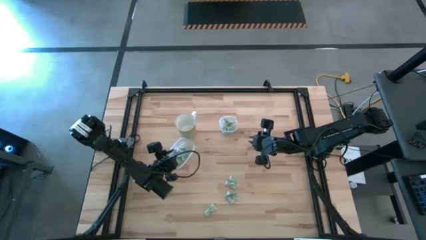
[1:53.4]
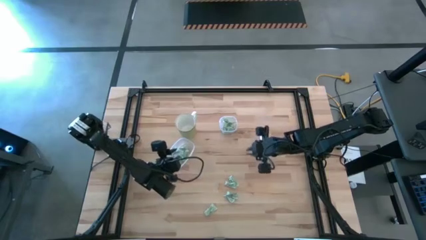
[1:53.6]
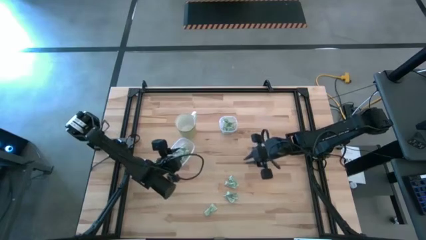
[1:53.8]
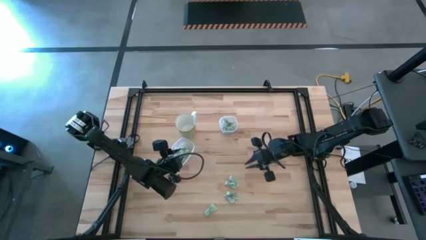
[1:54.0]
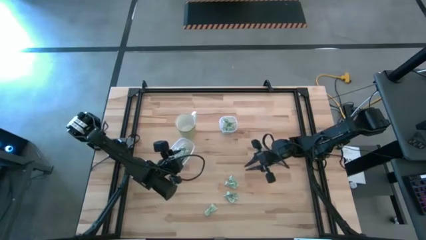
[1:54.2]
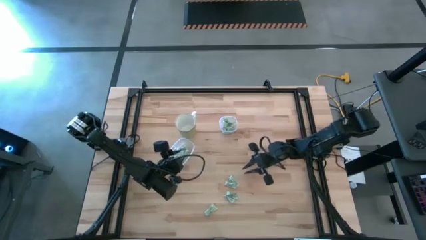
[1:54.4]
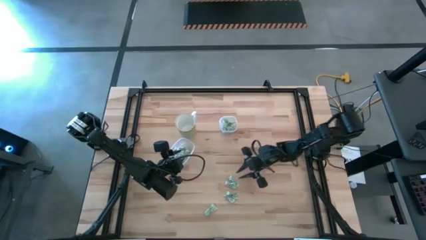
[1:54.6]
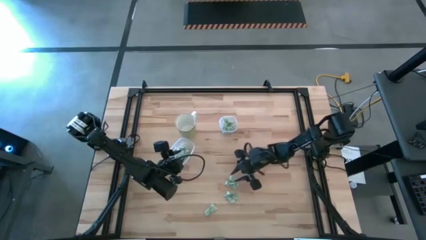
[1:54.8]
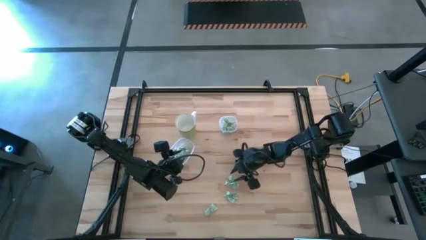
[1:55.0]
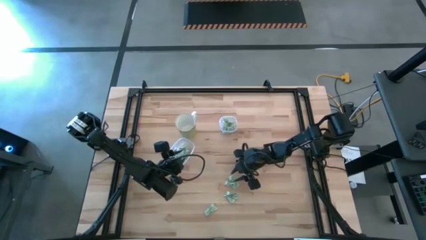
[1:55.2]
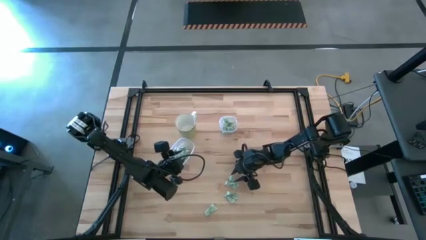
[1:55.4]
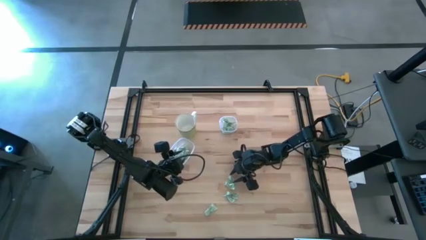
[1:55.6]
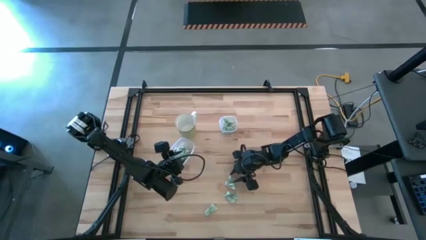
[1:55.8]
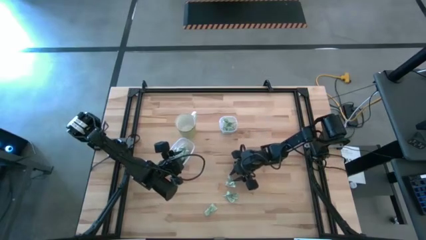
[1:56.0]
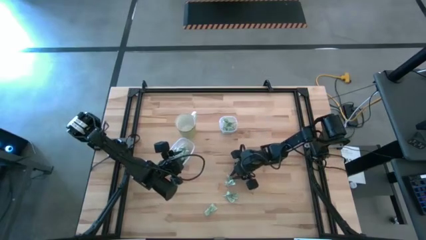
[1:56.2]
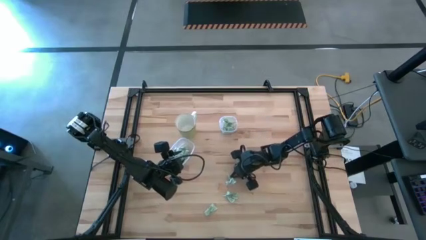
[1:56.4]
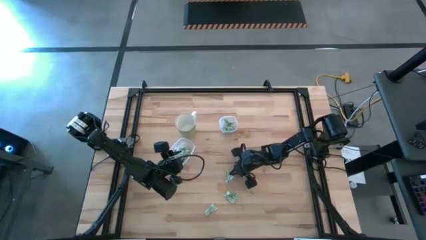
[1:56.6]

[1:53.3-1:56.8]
Task: Pick and place items into bin
Put the stevia packet into the top transparent bin

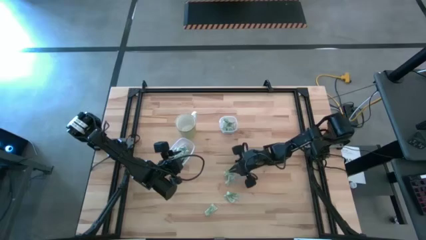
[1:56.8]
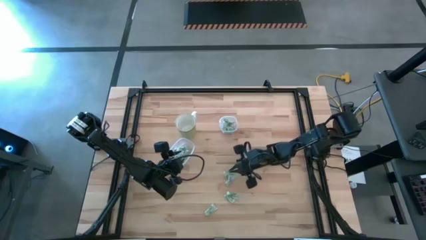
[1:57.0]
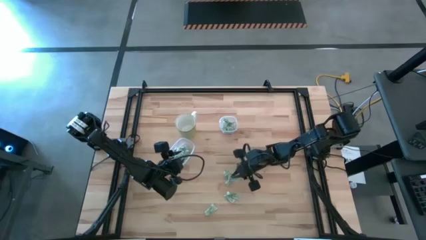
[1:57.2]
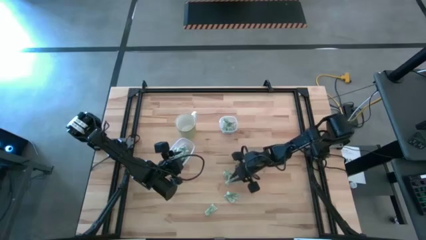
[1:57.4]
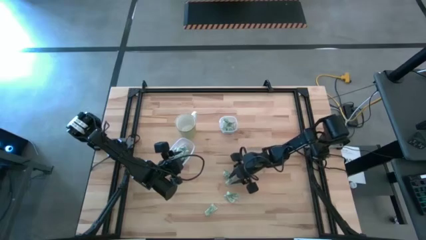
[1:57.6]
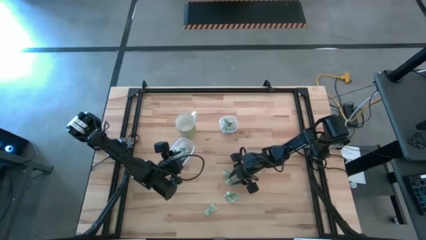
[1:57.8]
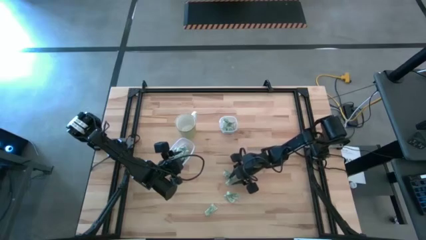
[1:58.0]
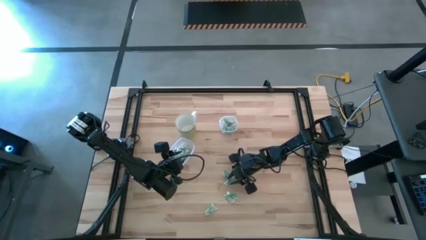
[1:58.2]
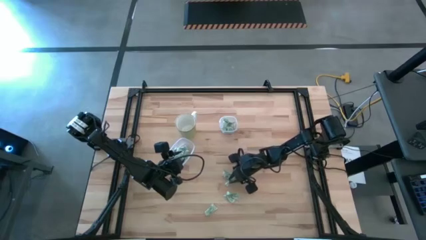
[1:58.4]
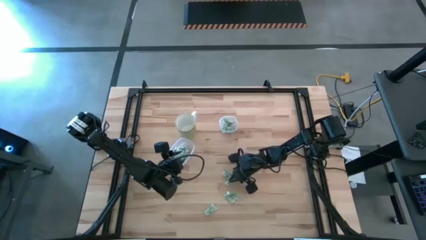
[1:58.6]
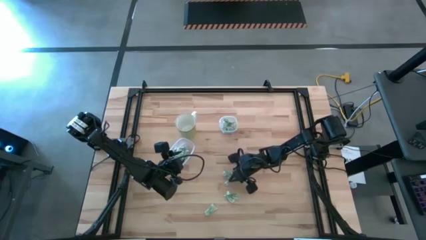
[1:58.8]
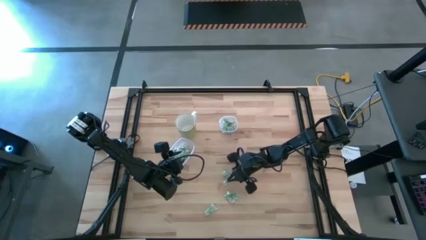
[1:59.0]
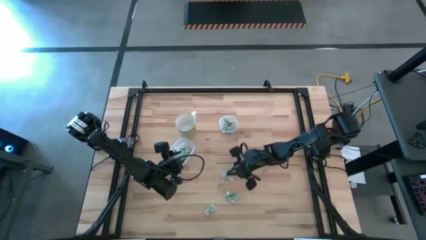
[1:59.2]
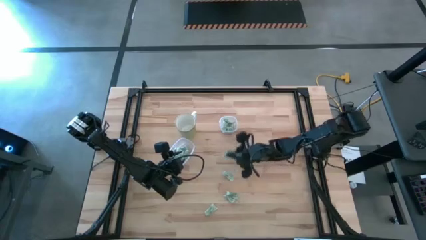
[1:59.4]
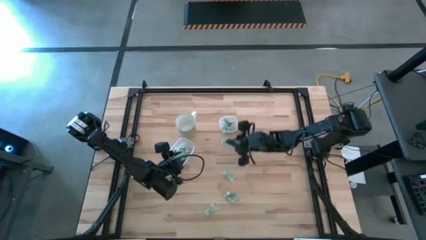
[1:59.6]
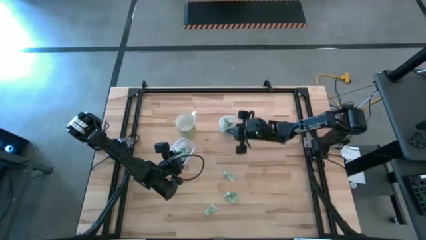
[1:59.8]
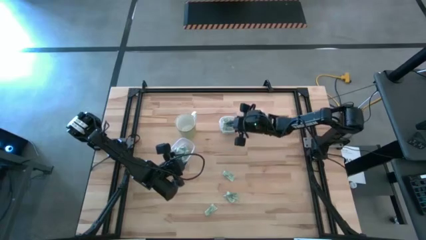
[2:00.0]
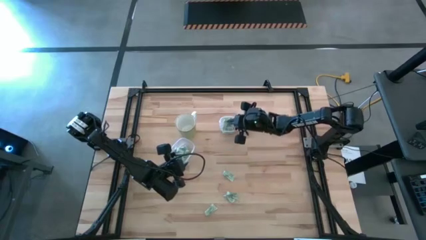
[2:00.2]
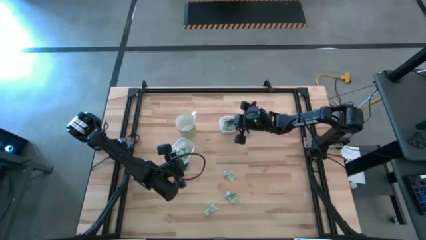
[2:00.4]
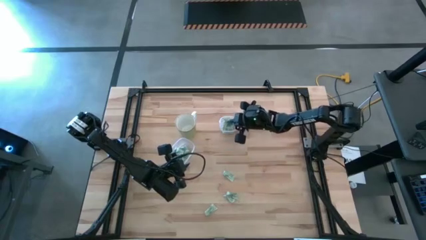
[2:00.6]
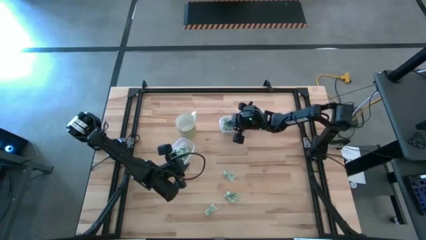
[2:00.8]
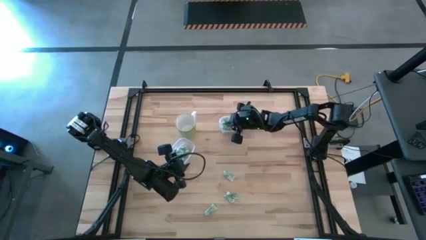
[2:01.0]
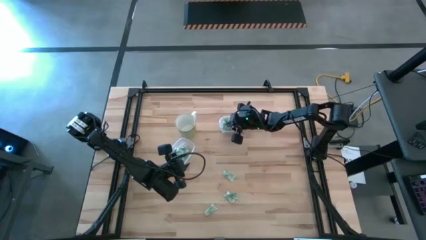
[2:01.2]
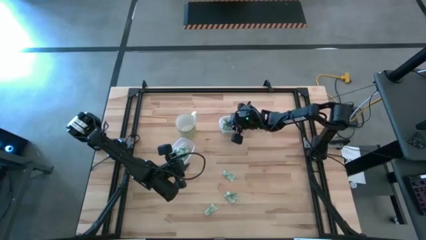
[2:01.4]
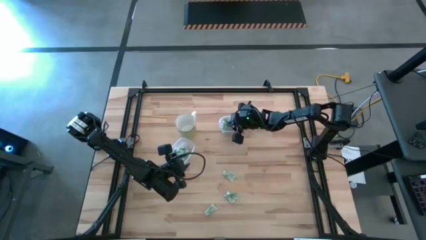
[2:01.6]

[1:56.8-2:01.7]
Put the stevia packet into the top transparent bin

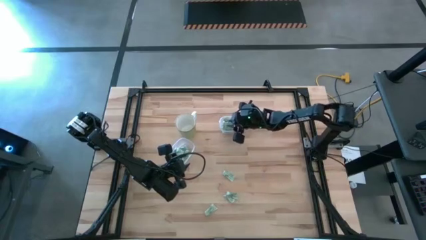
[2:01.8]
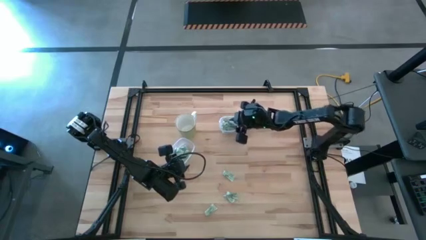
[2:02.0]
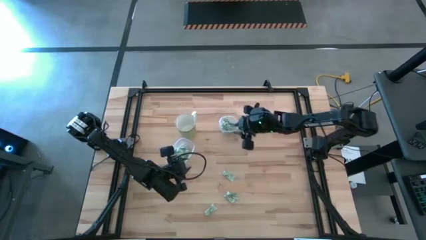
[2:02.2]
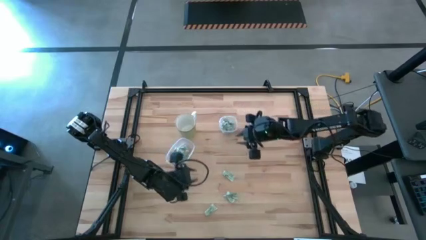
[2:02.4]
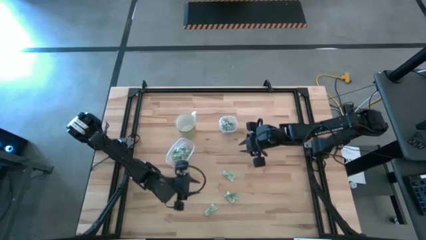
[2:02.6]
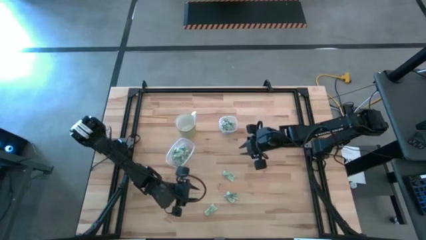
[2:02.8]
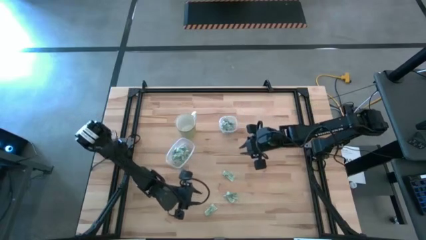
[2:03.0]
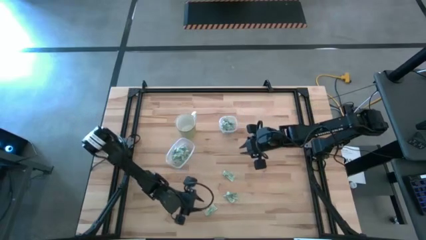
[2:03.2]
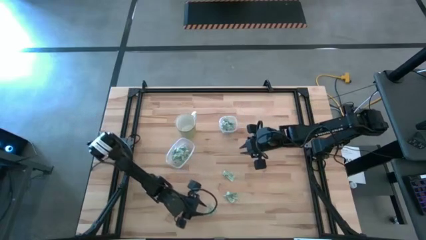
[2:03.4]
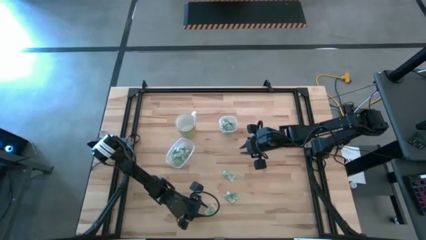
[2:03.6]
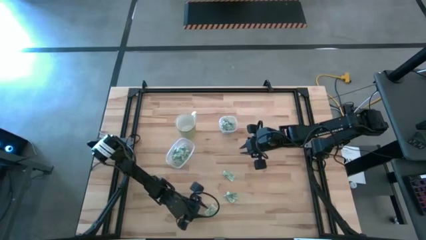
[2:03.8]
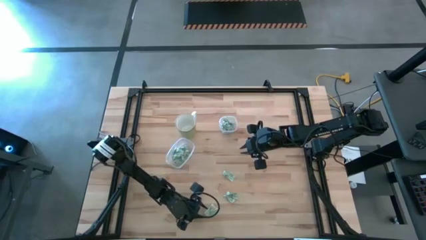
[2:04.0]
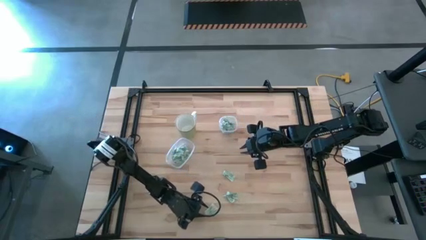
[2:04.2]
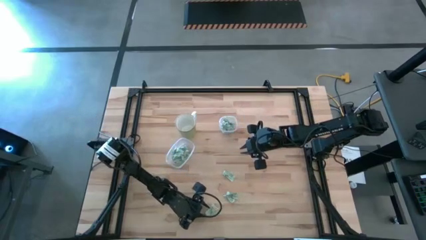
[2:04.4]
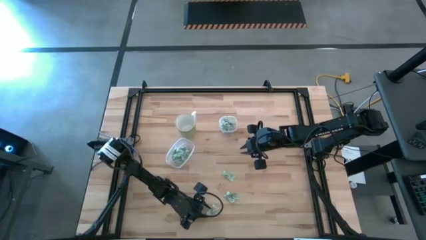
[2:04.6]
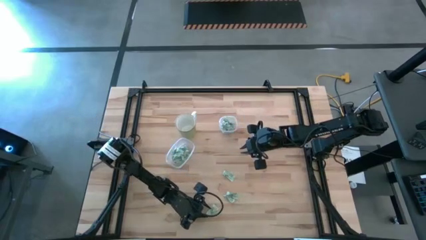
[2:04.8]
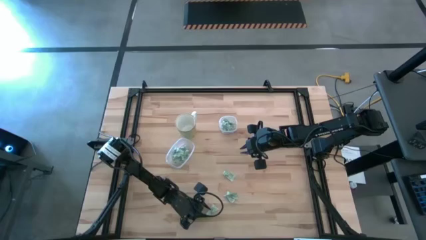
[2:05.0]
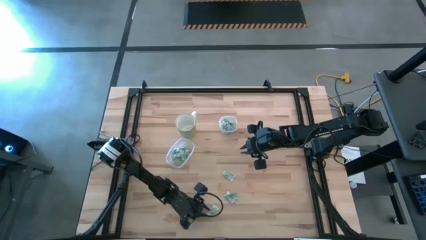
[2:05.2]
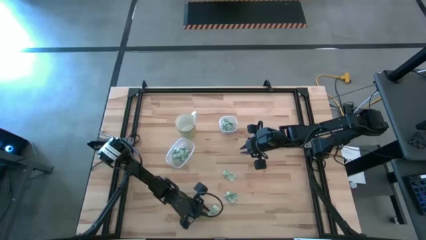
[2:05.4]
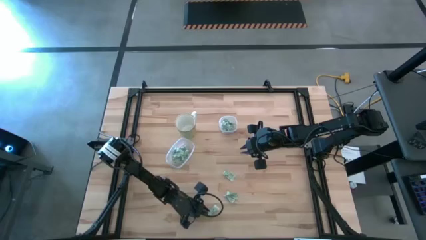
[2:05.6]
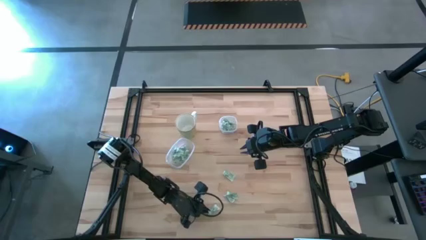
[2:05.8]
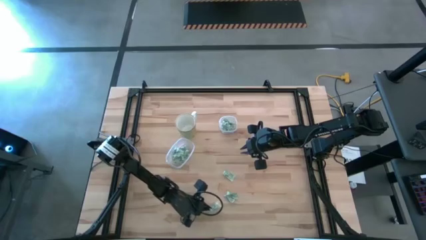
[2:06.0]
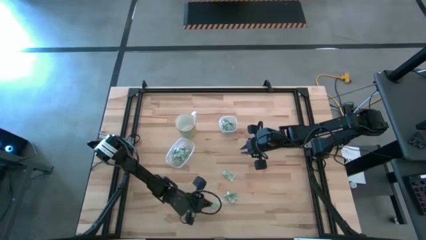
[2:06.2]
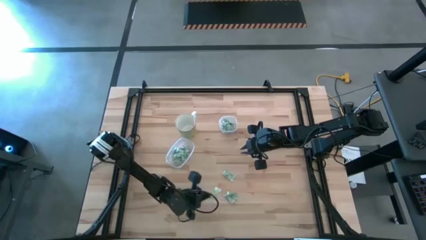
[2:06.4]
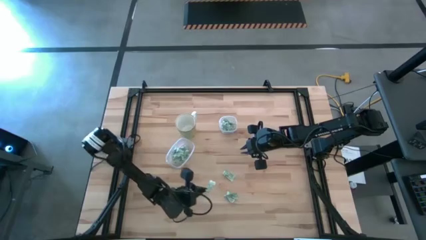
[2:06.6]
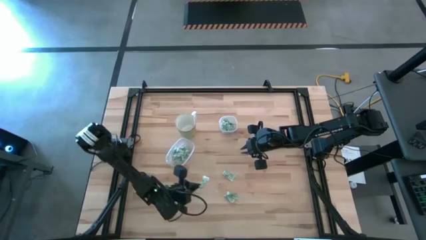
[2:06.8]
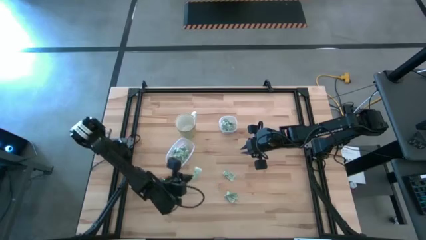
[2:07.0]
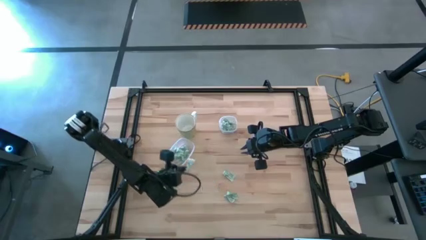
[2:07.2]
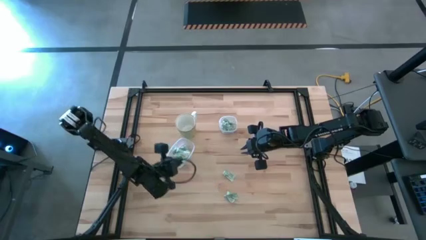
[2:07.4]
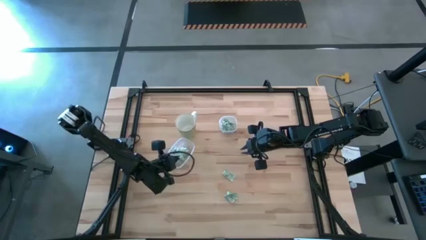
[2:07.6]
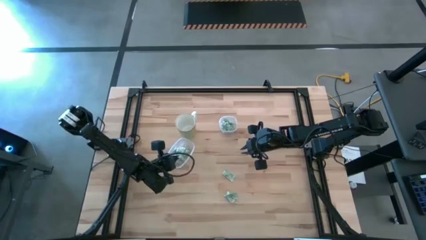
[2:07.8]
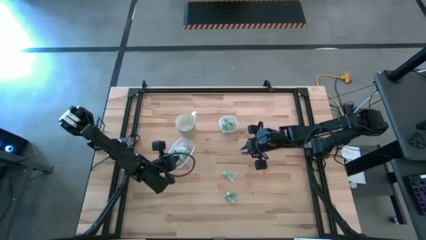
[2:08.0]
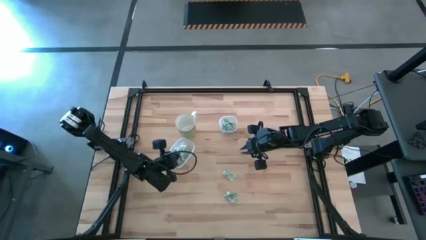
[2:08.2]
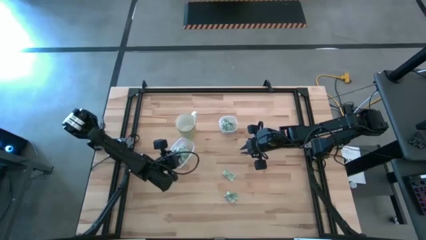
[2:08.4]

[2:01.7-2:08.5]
Put the stevia packet into the bottom transparent bin

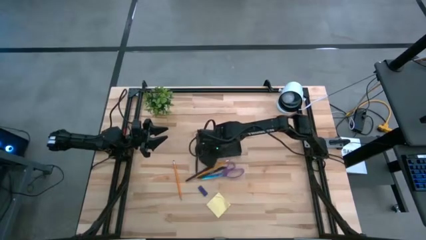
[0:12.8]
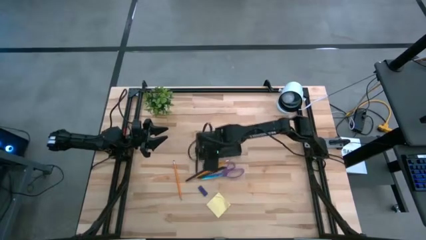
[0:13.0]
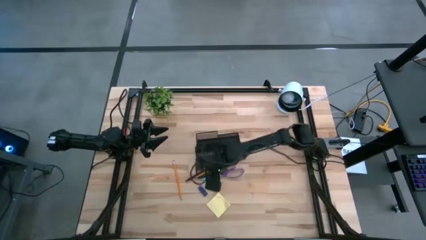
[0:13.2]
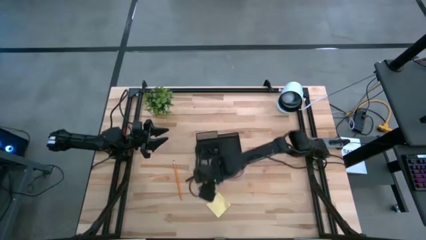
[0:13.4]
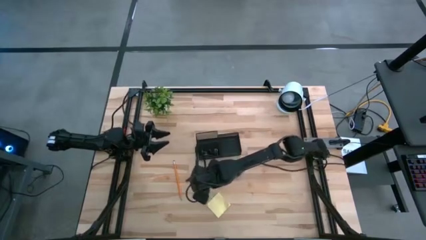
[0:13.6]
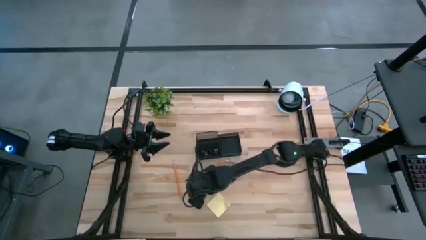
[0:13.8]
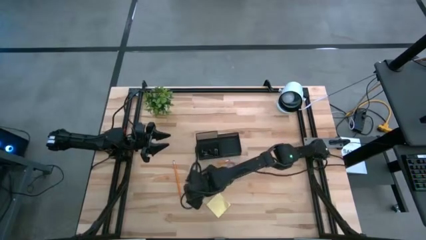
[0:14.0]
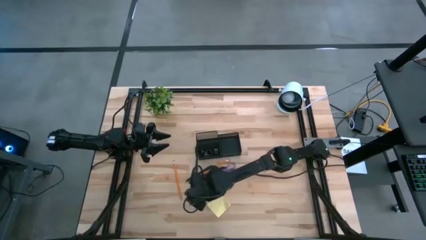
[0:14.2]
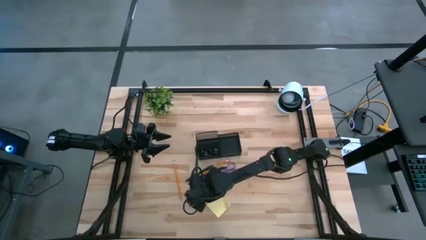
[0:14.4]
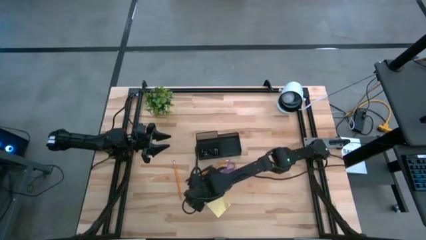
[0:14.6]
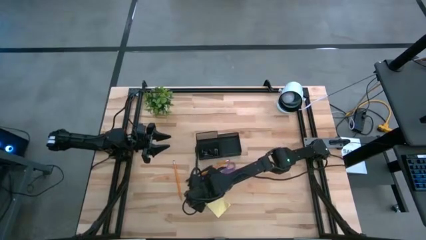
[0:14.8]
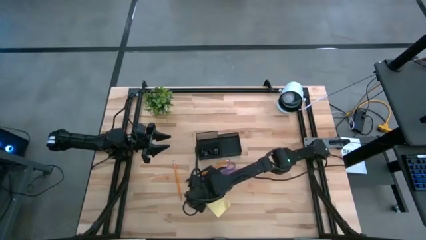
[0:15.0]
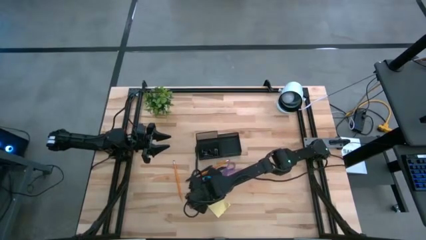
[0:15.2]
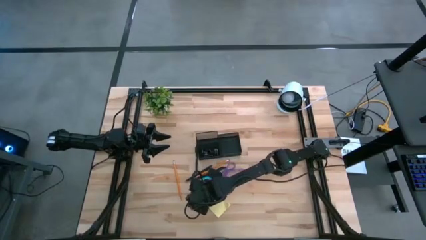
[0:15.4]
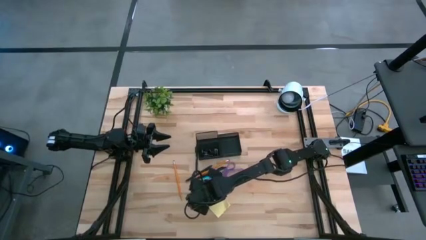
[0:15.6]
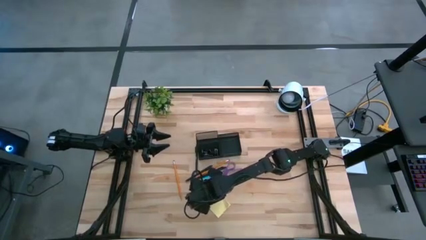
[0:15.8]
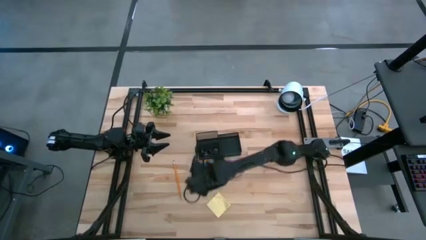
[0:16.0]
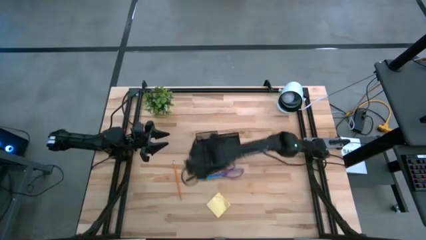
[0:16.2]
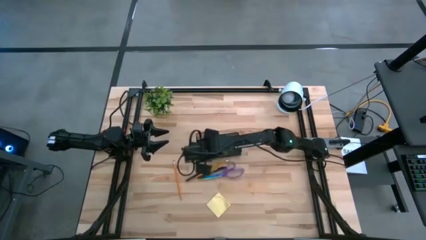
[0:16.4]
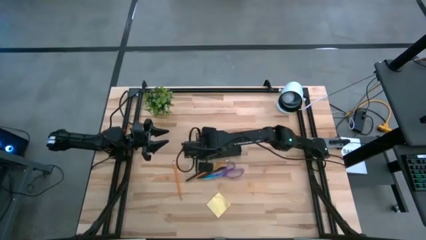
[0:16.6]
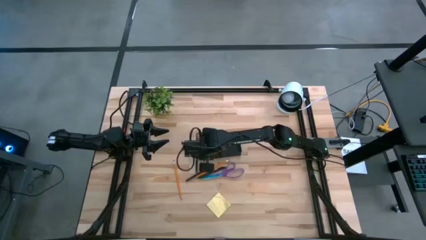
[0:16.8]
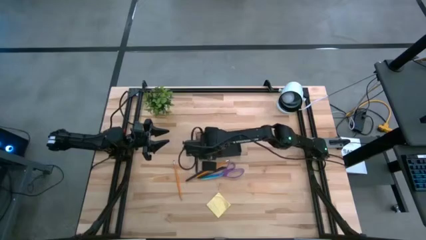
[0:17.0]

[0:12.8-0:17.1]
Task: Pick and place office supplies into organizer
Put the blue eraser into the black desk organizer
